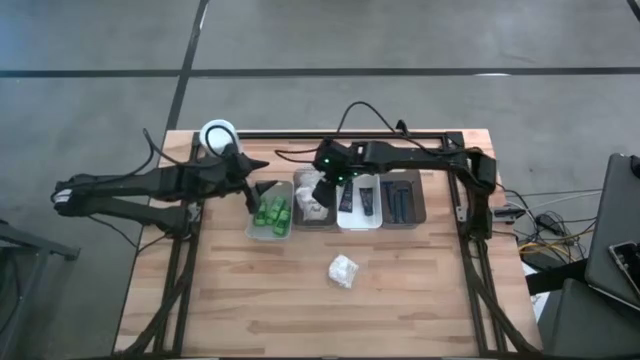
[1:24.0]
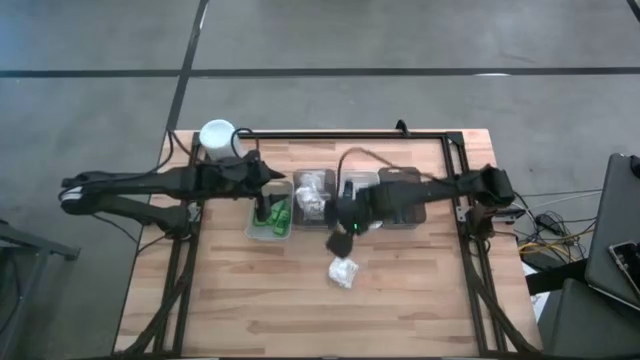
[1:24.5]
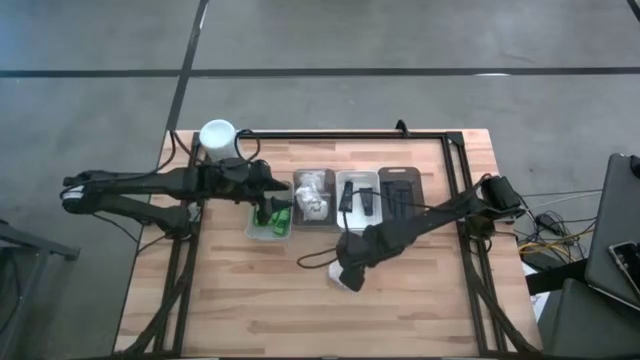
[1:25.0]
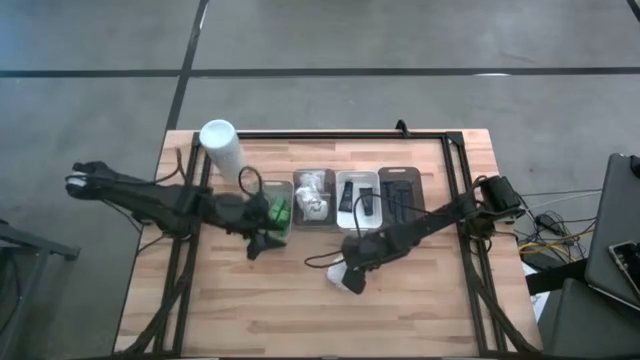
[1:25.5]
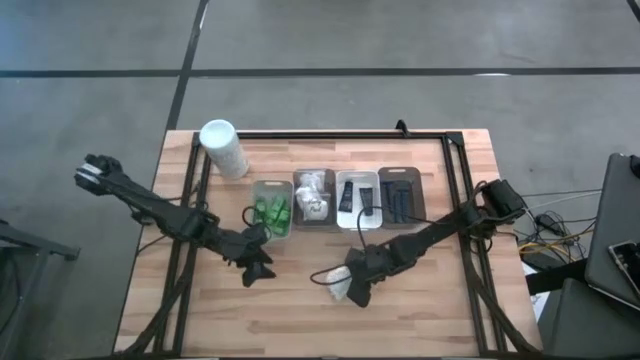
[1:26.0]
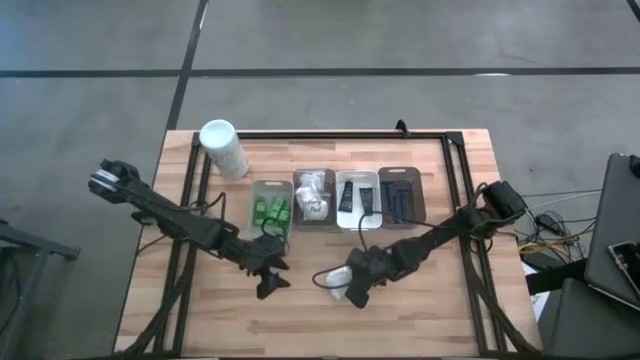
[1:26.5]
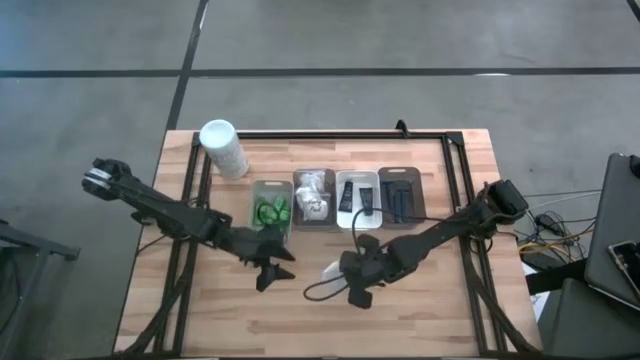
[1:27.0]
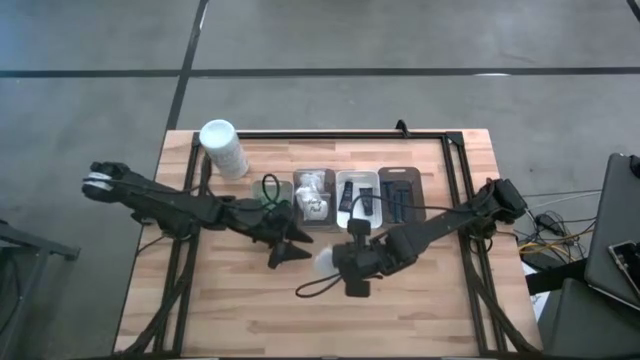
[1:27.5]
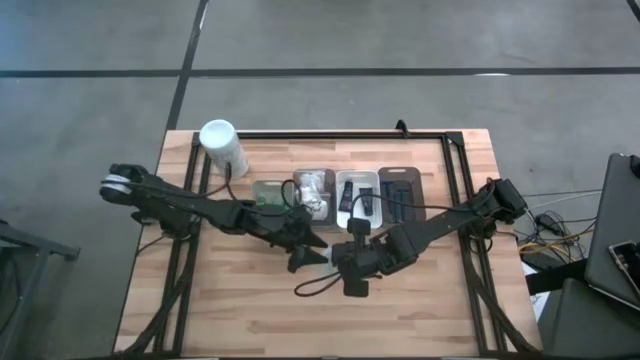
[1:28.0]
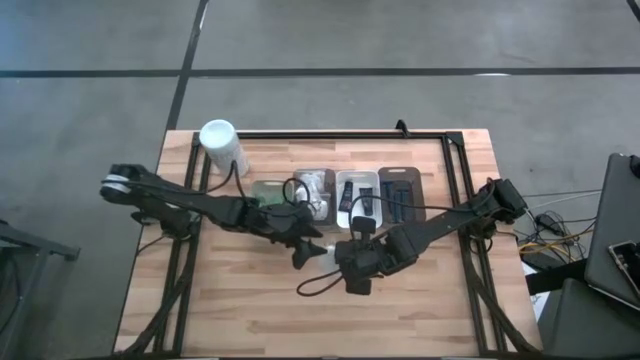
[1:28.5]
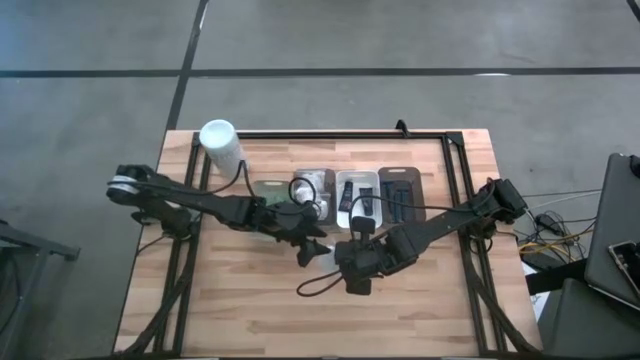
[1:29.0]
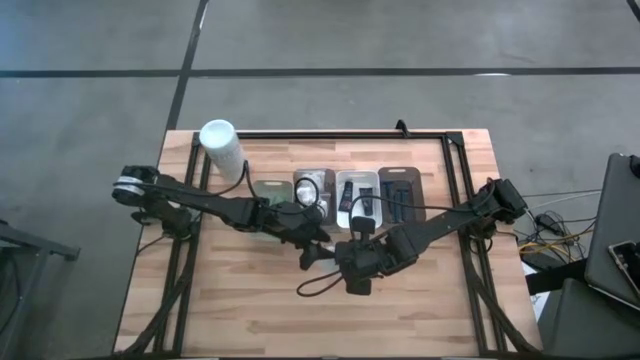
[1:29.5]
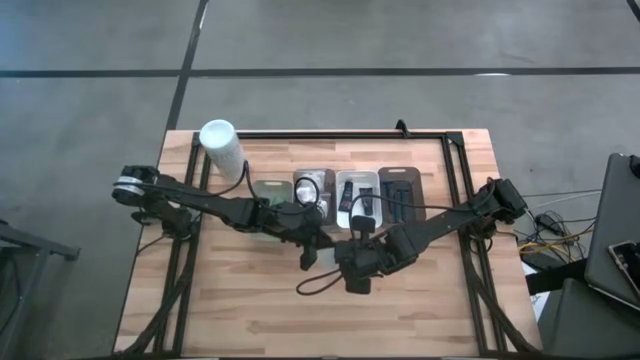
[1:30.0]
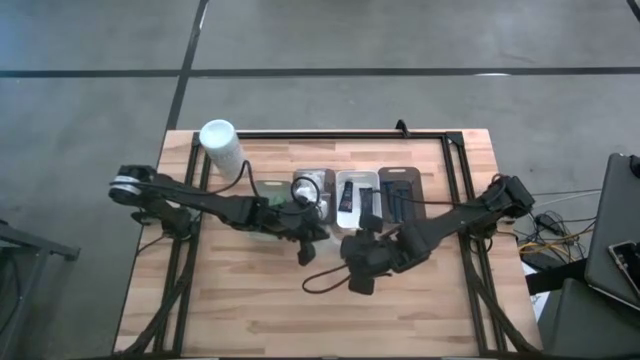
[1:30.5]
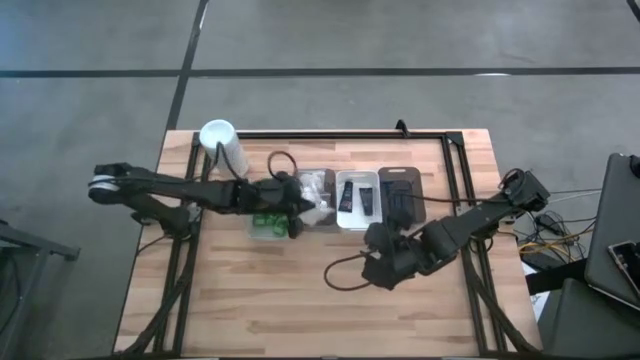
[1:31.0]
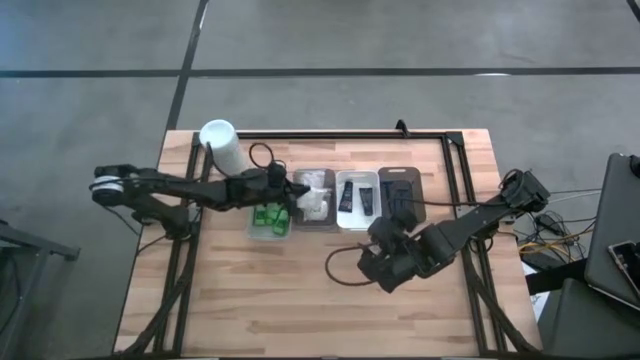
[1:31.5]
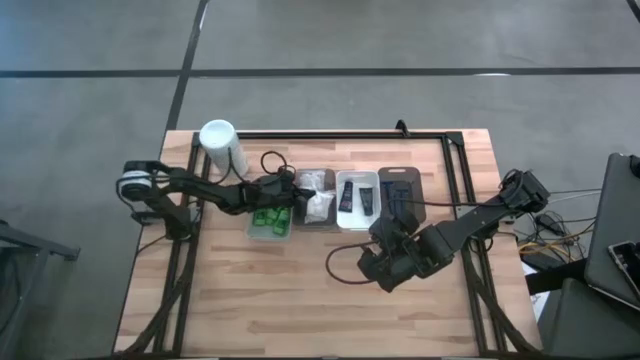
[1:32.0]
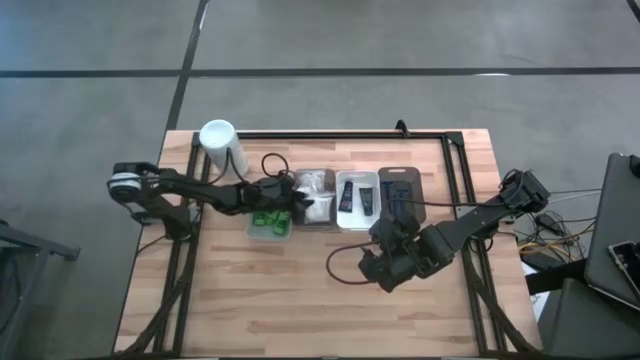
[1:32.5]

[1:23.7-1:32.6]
Task: Pick & Place Travel size toiletries
Put the cotton pack into the left black bin

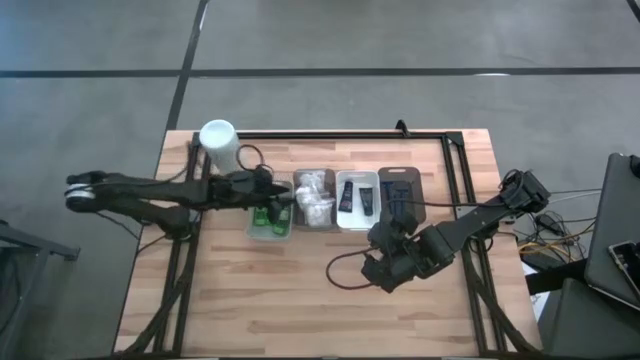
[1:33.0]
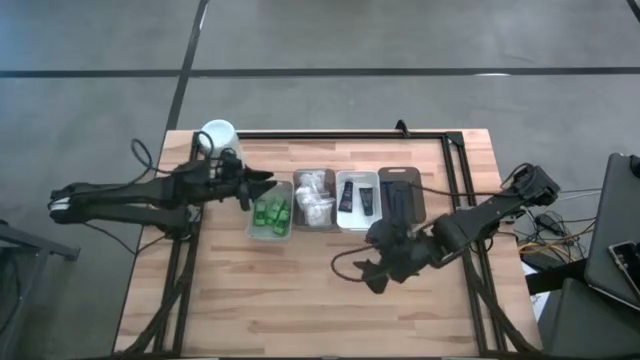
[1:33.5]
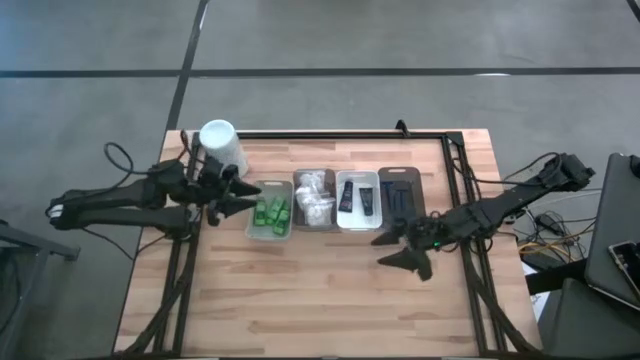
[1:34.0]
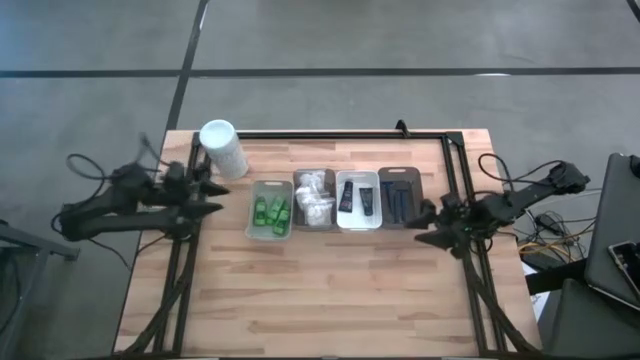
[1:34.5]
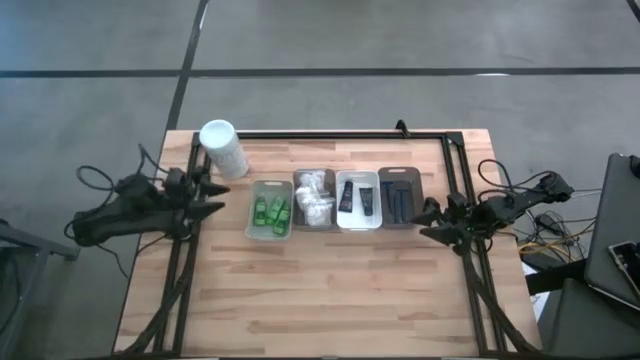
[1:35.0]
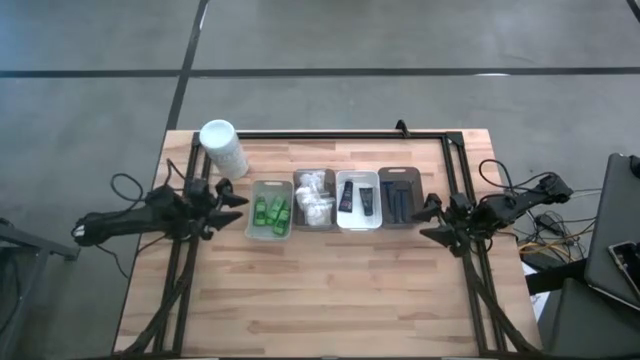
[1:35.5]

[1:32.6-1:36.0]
Return to Home Position

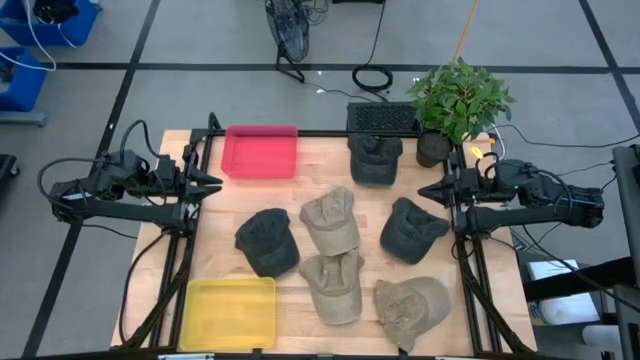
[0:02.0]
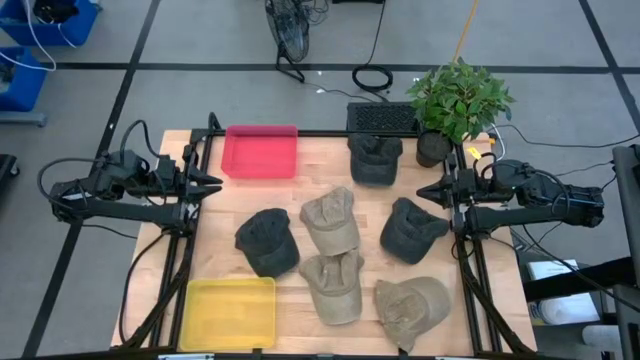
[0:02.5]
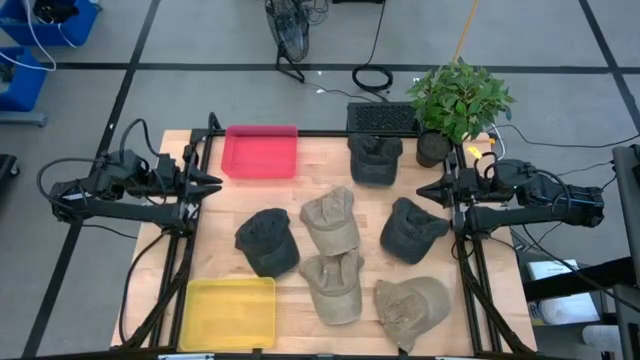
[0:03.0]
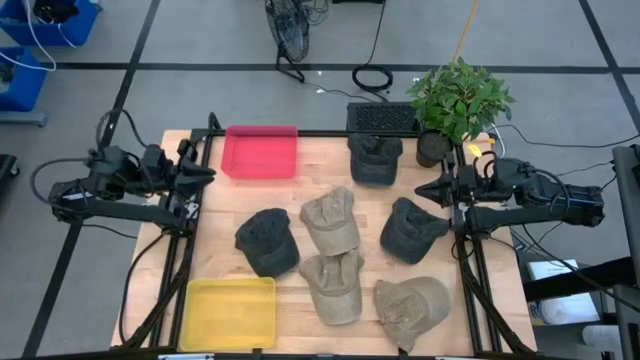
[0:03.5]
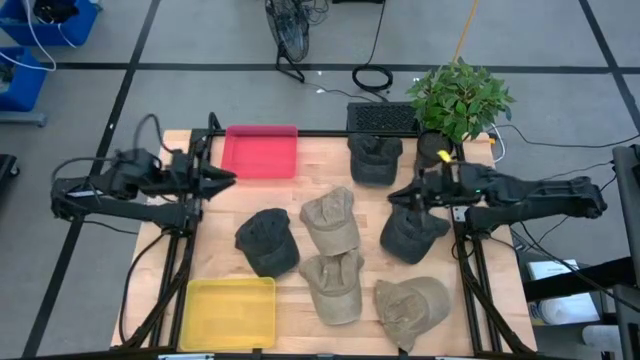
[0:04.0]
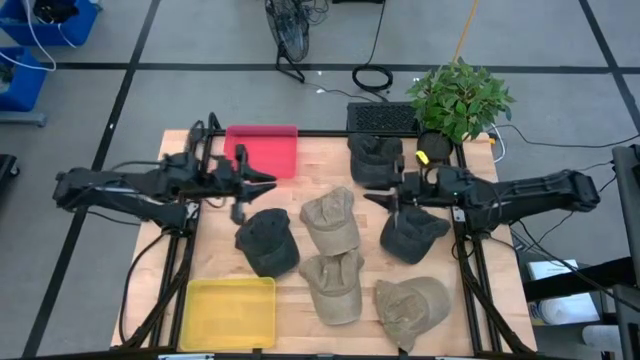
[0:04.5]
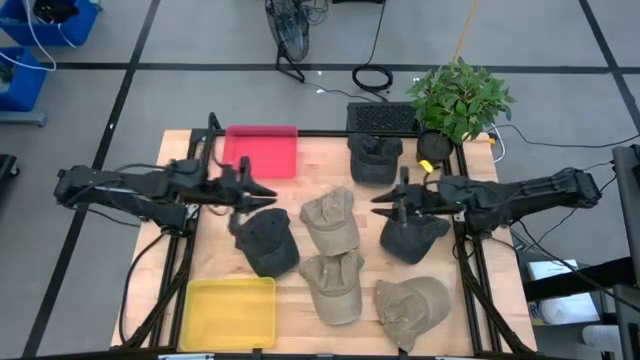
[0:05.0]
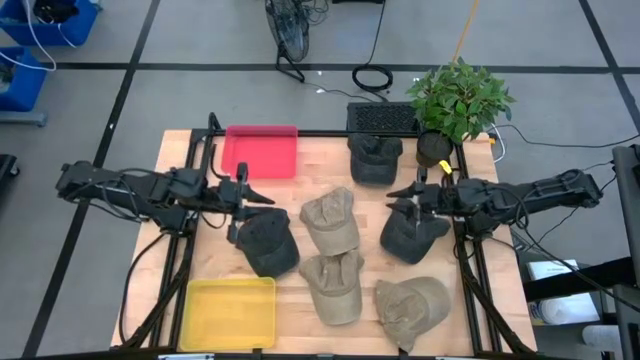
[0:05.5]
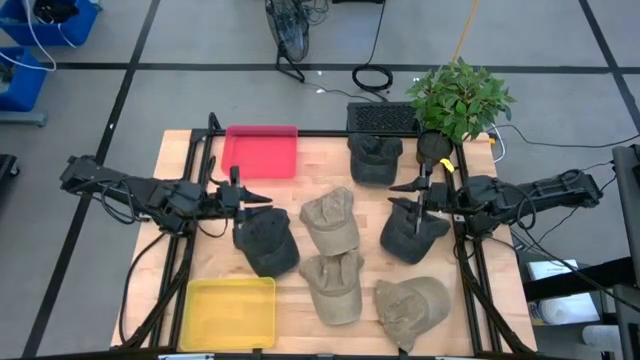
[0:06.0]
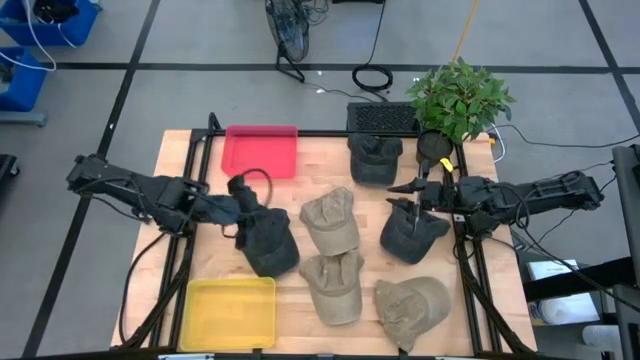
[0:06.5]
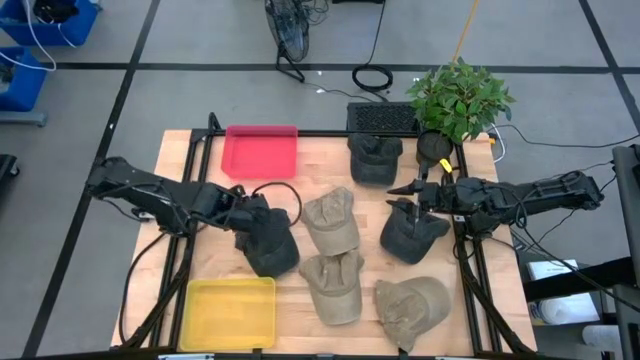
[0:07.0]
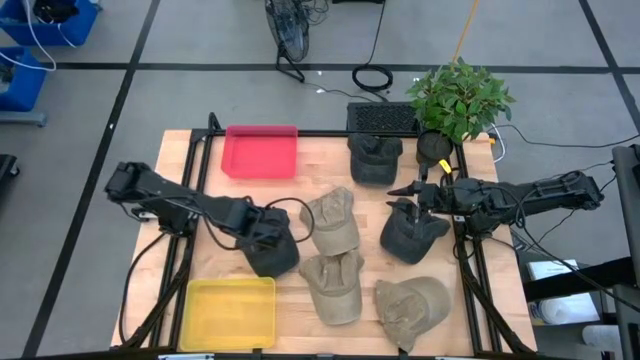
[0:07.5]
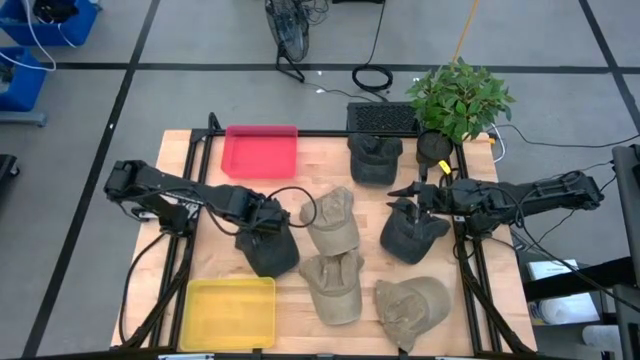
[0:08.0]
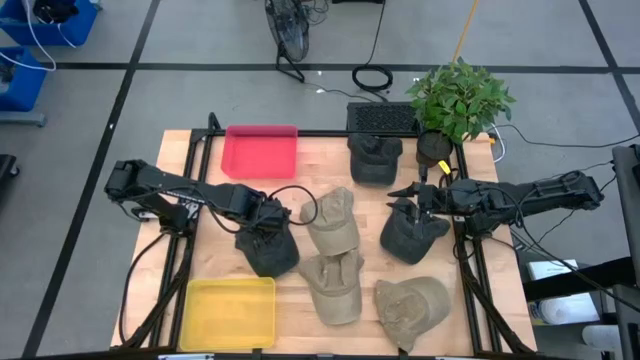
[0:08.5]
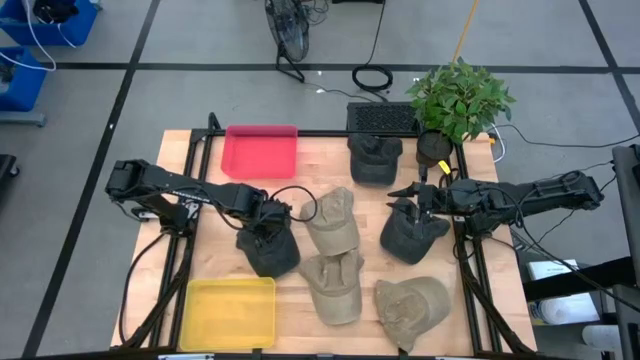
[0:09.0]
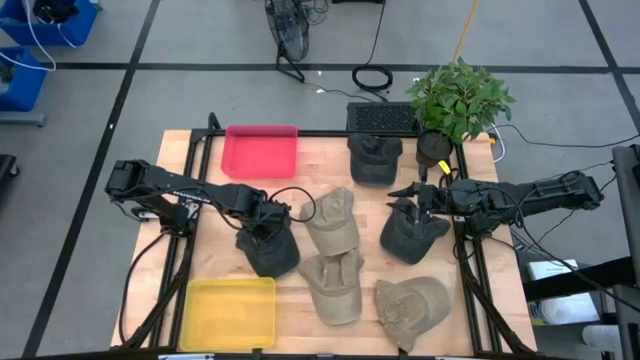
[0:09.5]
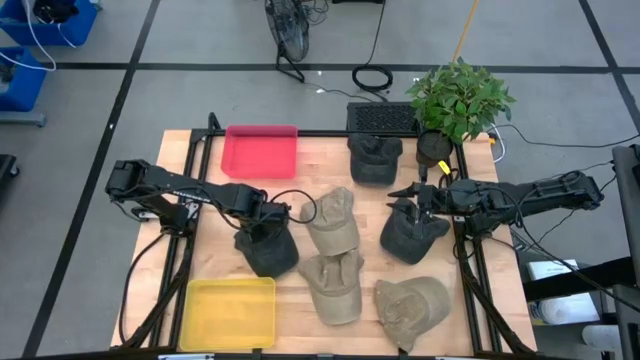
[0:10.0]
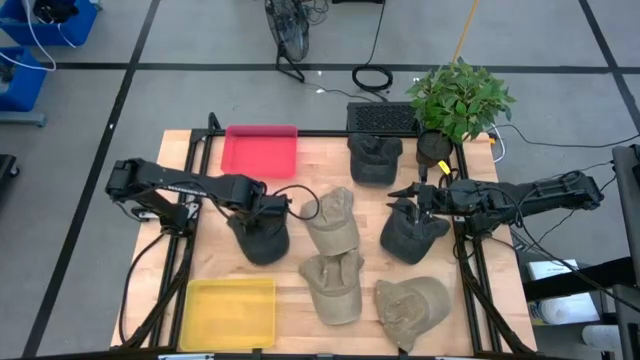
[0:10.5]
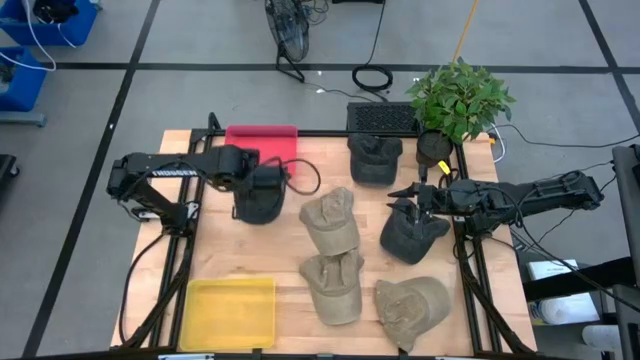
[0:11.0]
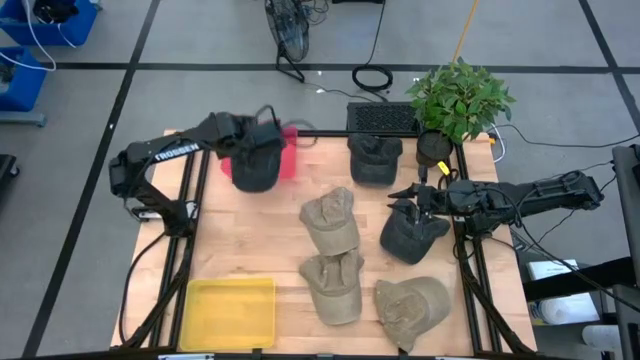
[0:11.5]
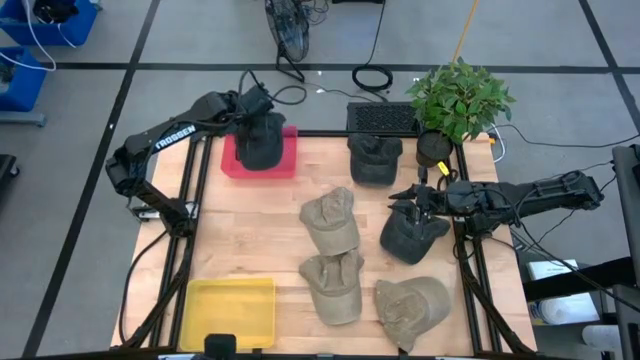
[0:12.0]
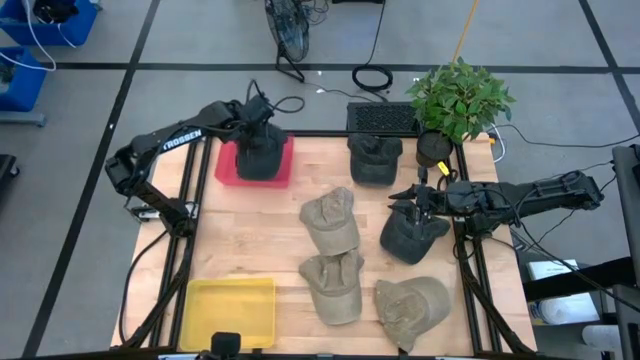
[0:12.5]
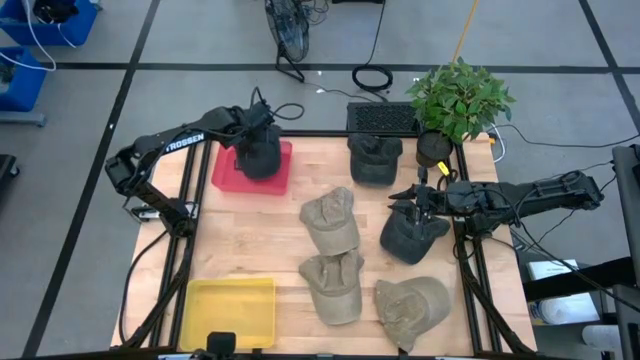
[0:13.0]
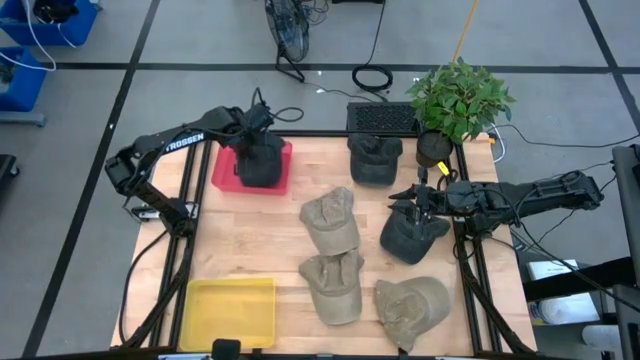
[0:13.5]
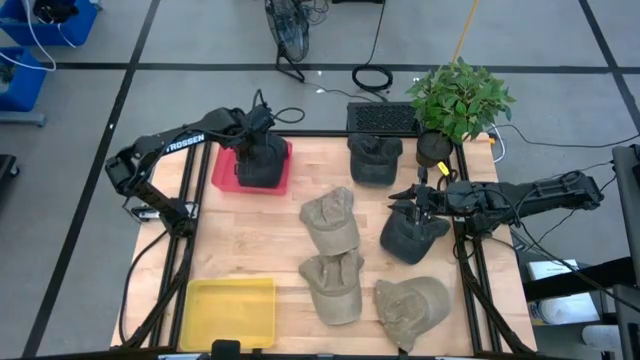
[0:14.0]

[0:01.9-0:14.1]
Task: Pick & Place hat
Put the bottom left black cap into the red bin
